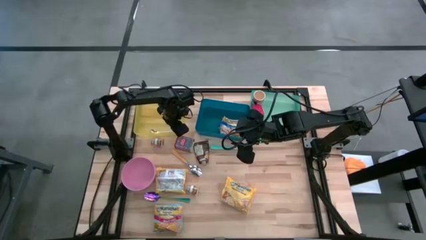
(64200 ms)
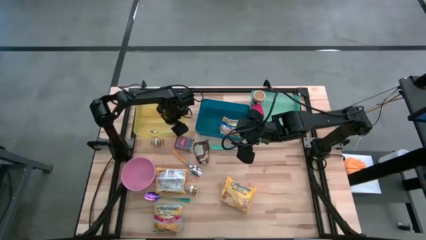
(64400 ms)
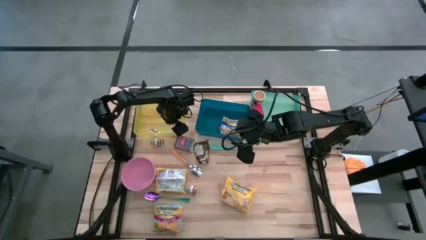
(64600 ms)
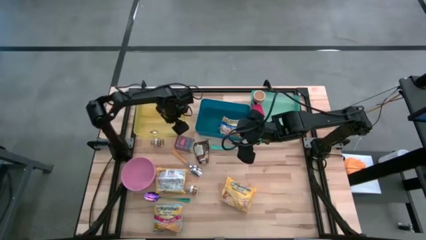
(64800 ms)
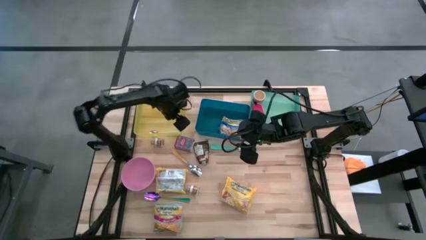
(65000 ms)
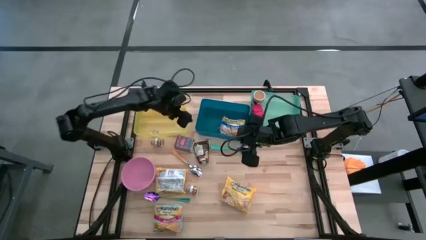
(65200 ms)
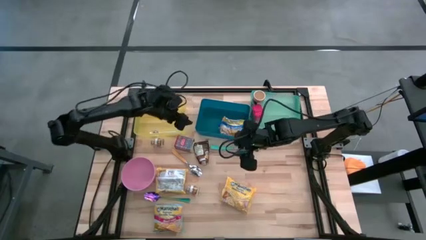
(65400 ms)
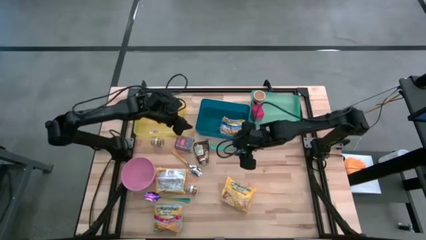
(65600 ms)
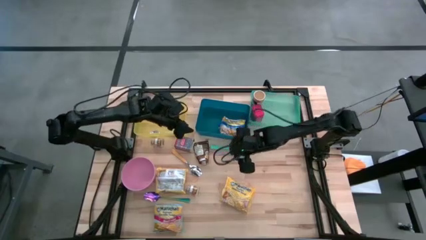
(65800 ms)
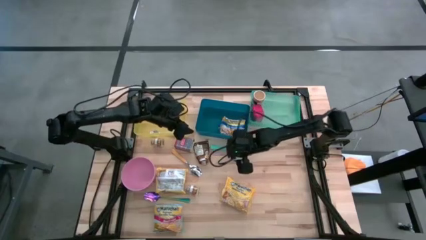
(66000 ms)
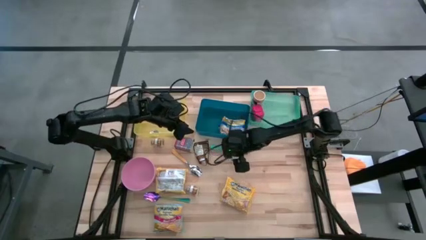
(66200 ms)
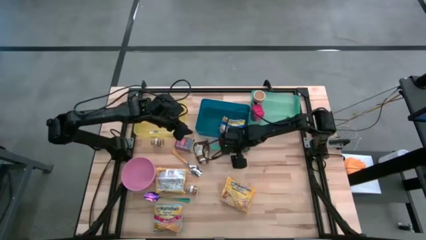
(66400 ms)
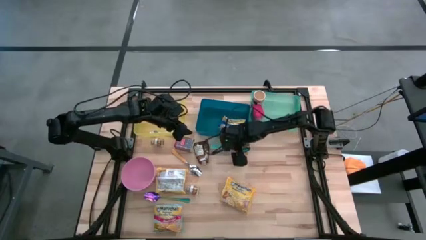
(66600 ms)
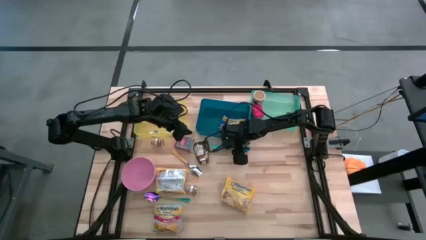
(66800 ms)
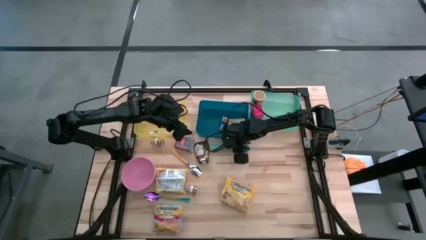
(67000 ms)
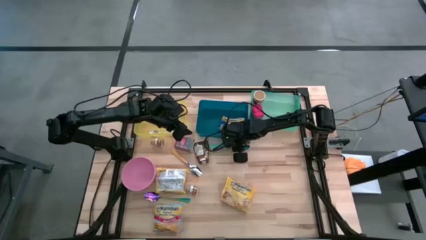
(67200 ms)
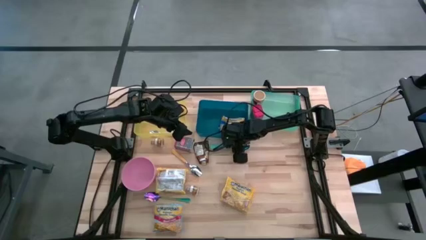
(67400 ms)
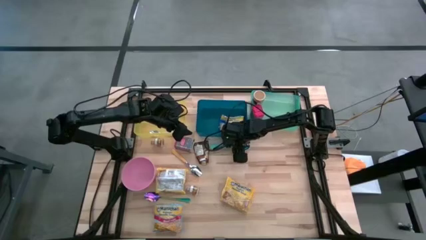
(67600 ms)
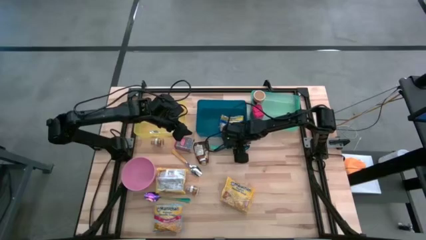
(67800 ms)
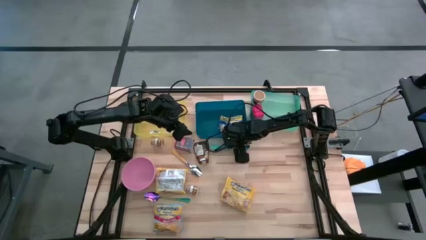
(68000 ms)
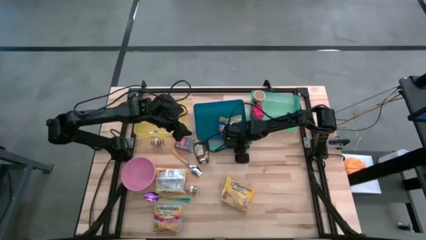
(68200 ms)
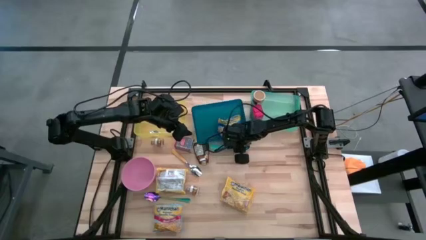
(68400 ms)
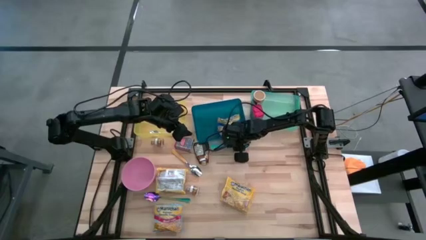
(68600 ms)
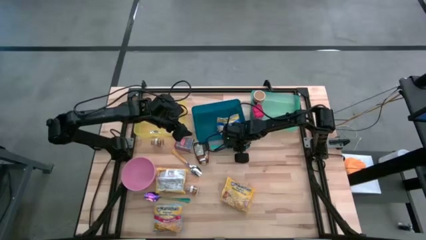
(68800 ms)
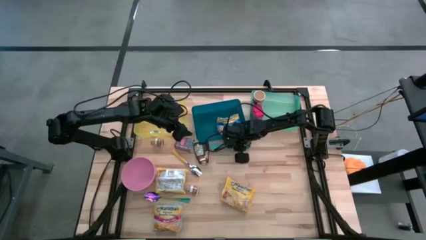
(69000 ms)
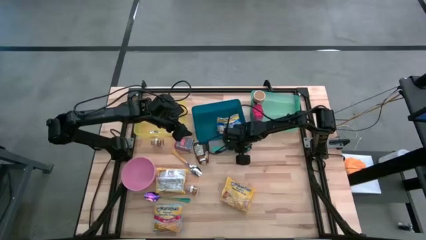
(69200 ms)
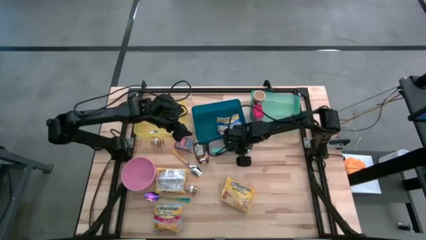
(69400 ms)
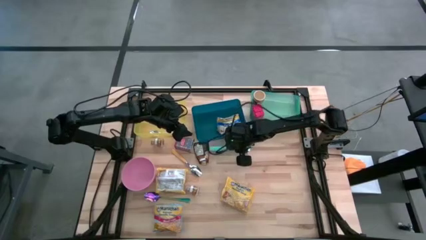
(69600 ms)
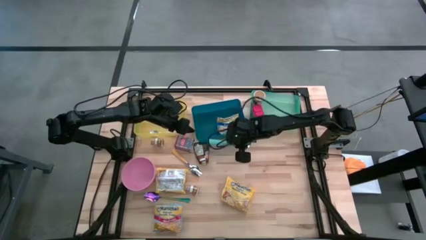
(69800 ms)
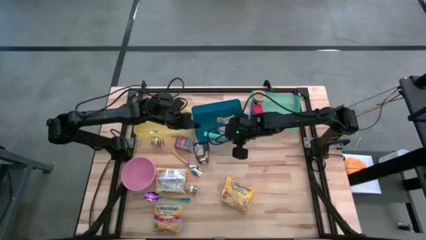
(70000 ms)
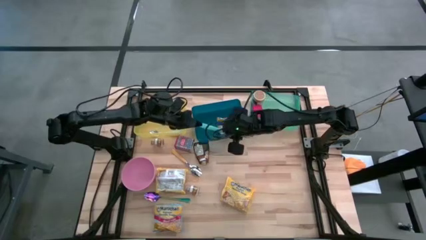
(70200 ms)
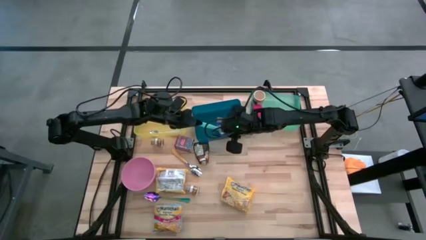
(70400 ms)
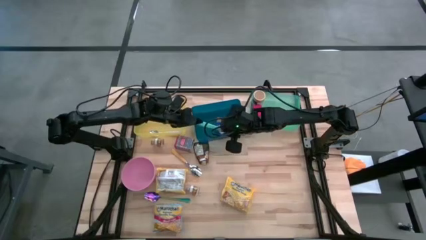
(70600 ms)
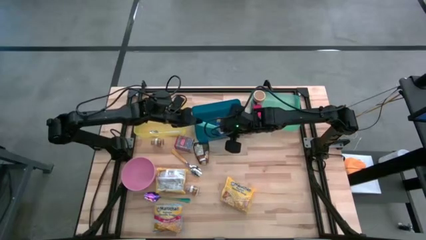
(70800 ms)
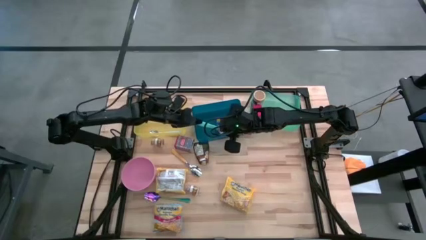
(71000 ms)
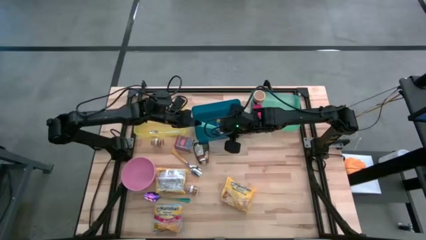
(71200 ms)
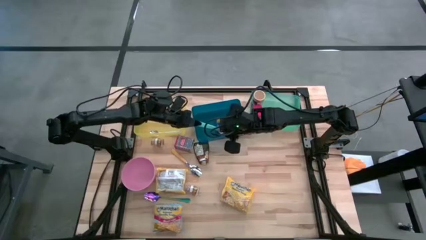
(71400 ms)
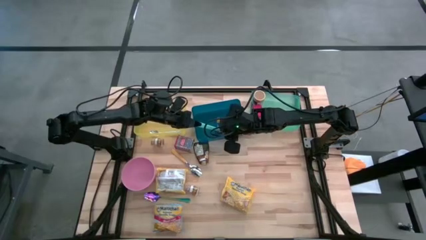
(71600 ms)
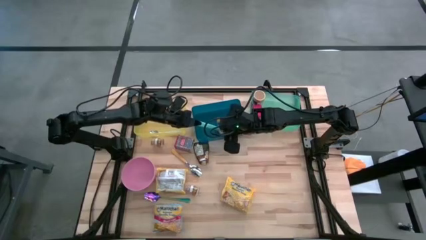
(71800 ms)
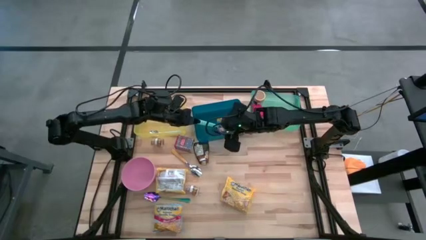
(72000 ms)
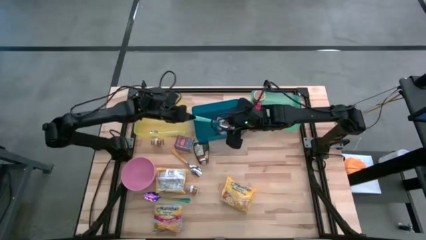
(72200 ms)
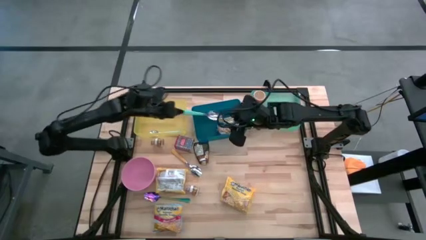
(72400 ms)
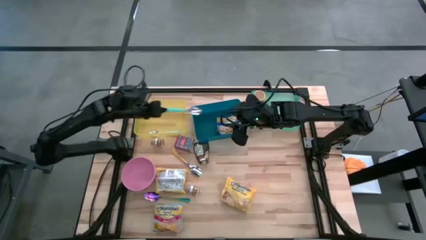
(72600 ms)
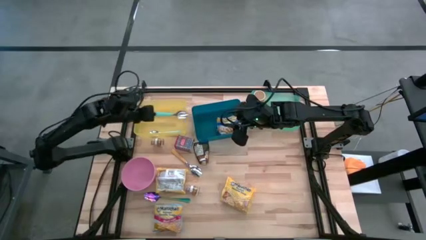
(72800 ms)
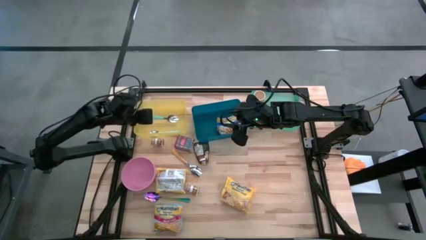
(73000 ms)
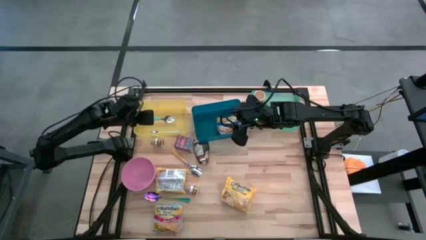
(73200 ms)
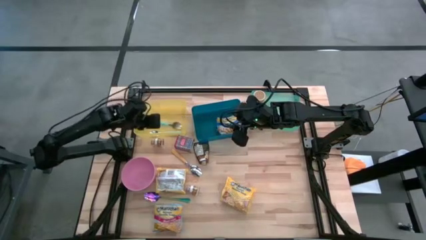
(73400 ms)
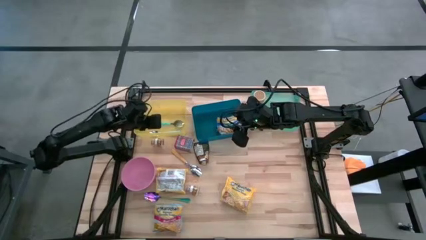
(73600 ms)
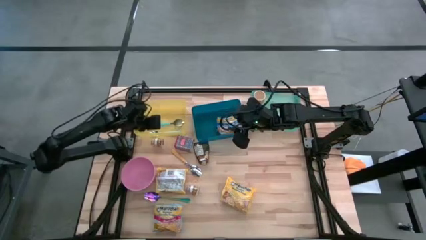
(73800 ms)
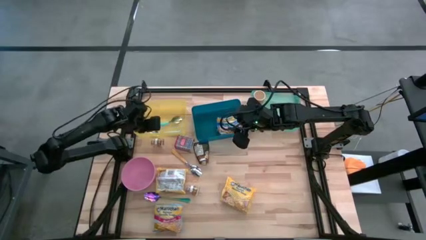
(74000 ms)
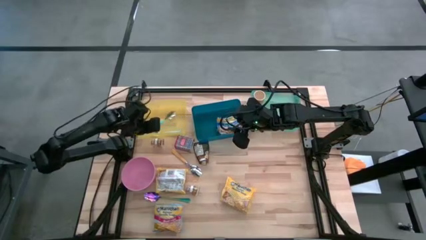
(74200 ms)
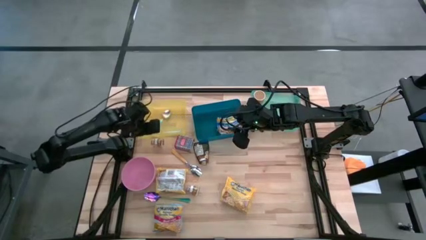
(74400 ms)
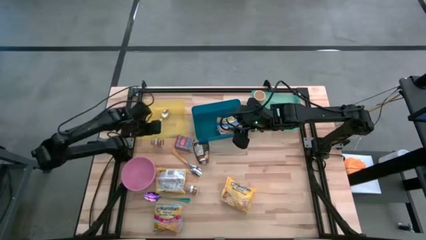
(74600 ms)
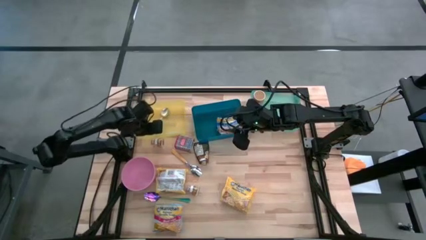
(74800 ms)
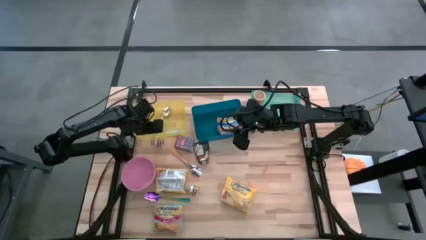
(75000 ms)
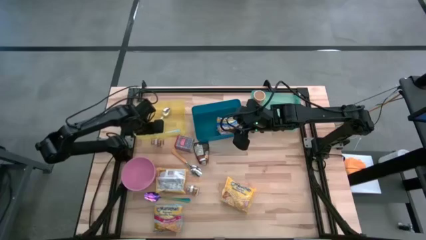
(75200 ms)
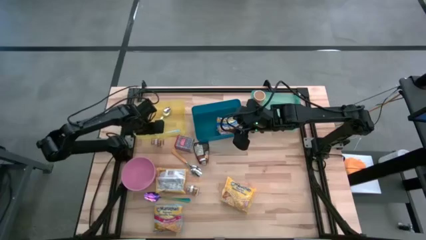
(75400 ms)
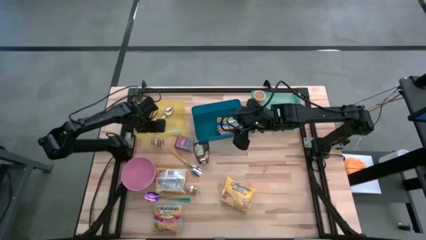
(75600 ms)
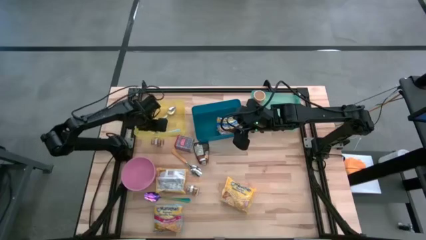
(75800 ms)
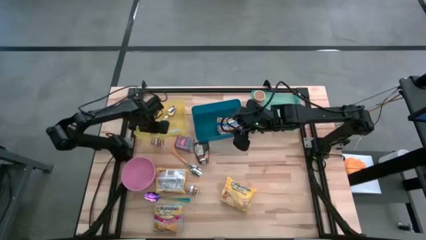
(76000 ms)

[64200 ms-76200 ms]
Put the light green spoon into the yellow transparent bin

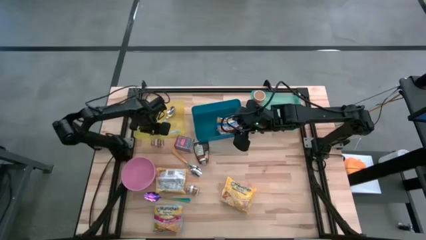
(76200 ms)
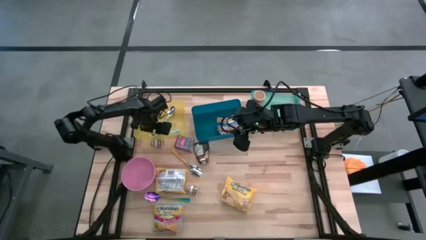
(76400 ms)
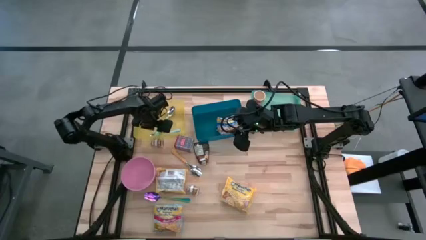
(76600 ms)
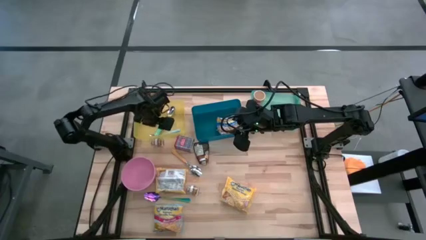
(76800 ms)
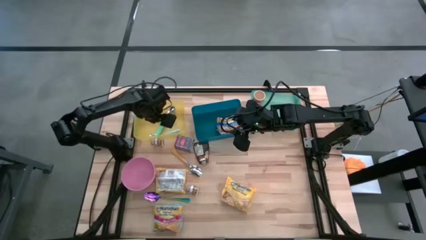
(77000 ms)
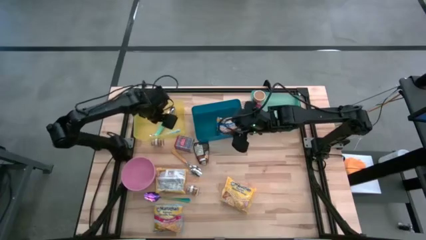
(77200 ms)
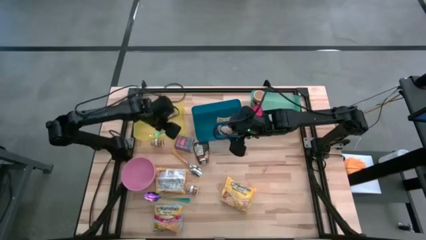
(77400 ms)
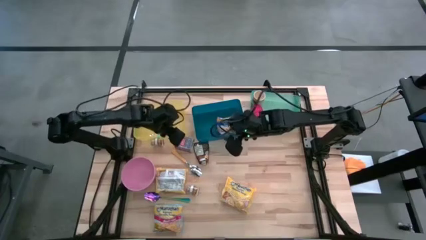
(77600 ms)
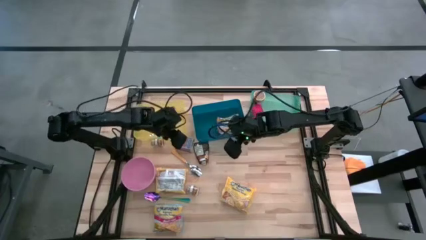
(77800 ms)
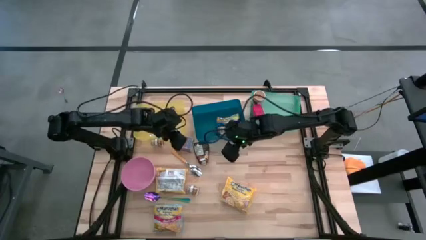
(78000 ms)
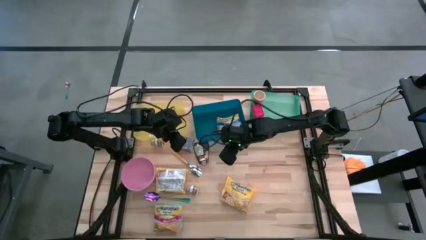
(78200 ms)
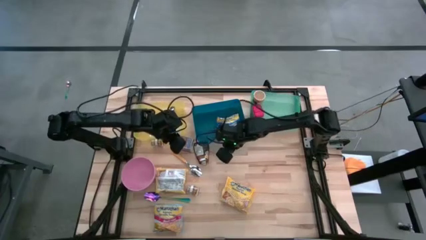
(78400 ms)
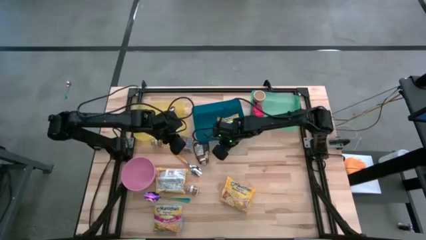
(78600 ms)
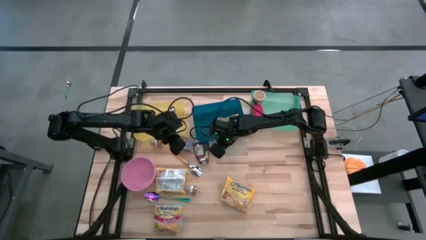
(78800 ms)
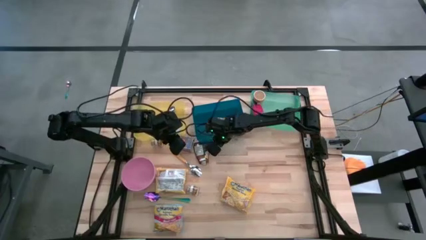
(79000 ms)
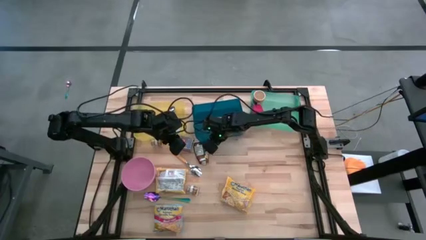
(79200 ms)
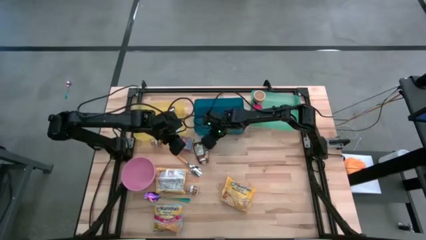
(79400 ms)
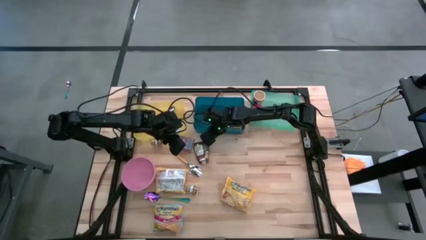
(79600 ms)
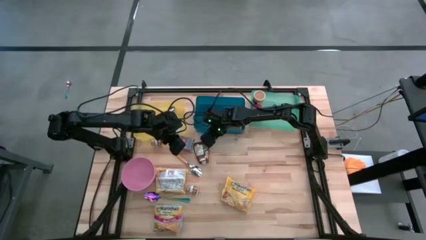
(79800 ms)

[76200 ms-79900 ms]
Adjust the blue bin
